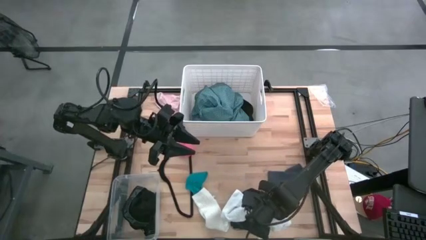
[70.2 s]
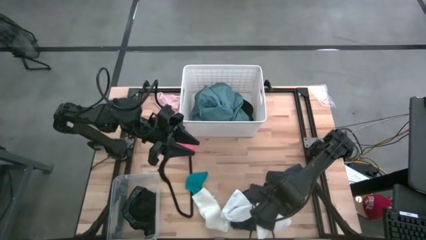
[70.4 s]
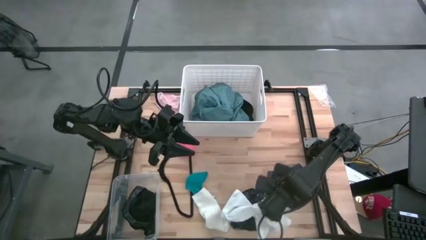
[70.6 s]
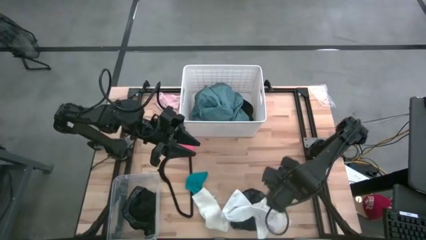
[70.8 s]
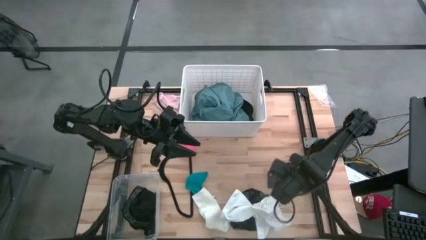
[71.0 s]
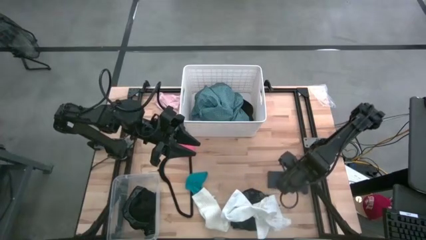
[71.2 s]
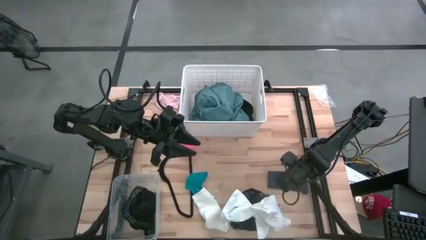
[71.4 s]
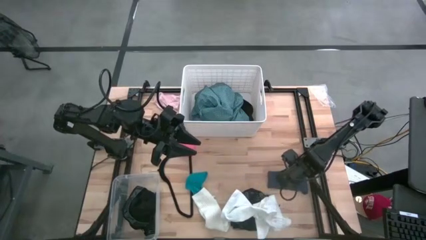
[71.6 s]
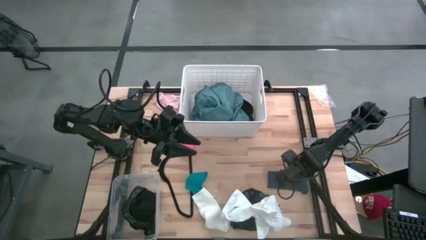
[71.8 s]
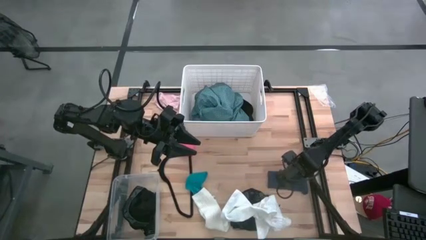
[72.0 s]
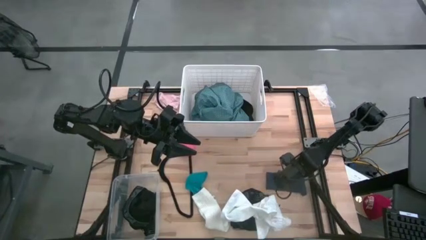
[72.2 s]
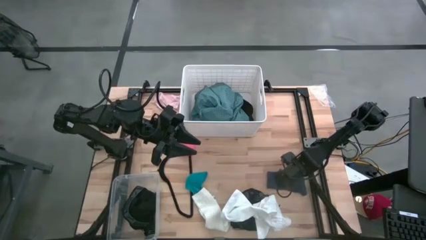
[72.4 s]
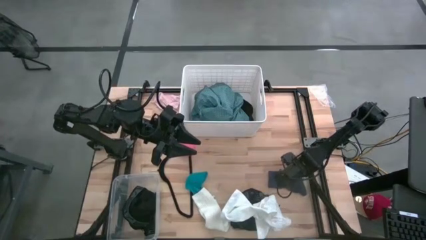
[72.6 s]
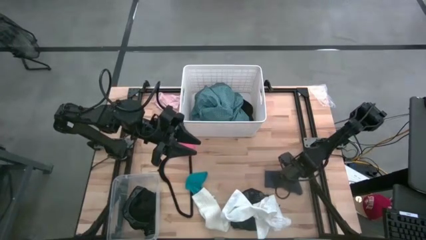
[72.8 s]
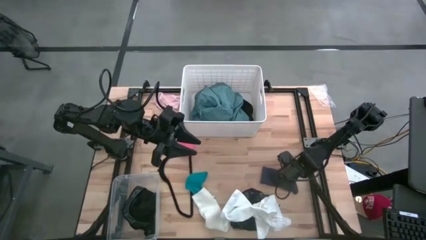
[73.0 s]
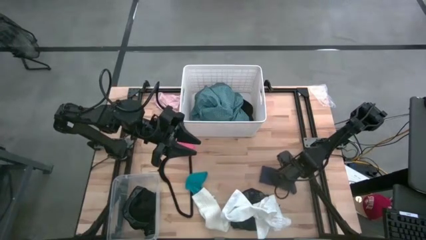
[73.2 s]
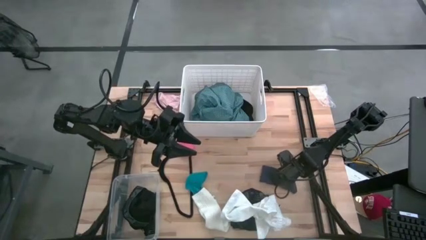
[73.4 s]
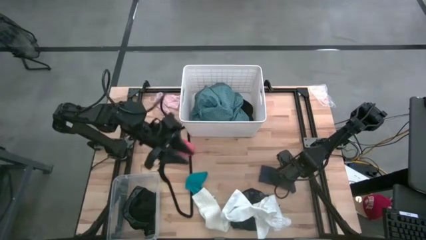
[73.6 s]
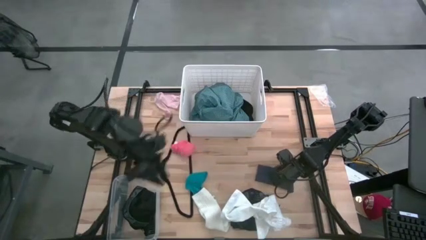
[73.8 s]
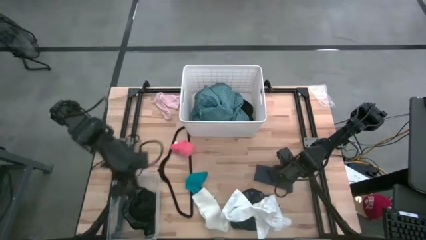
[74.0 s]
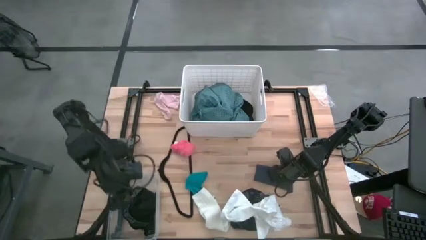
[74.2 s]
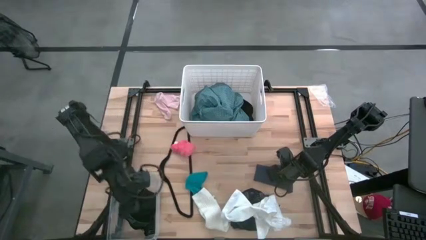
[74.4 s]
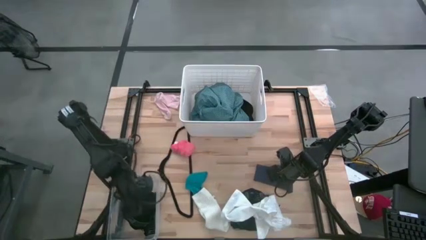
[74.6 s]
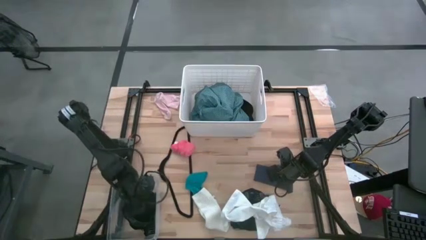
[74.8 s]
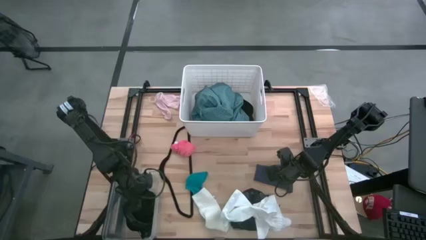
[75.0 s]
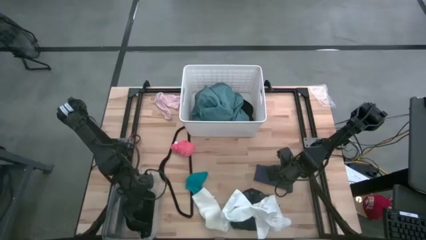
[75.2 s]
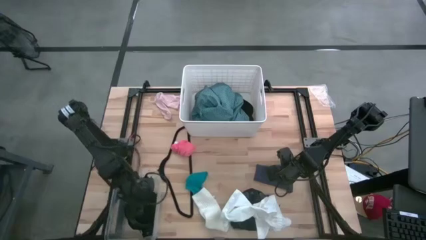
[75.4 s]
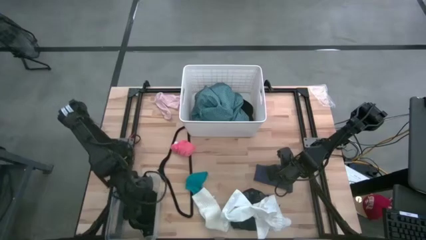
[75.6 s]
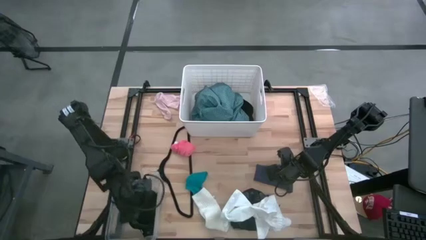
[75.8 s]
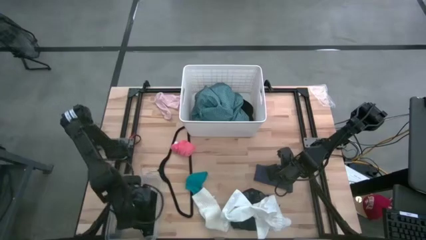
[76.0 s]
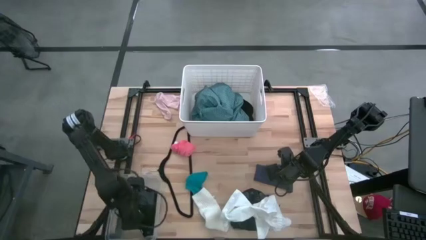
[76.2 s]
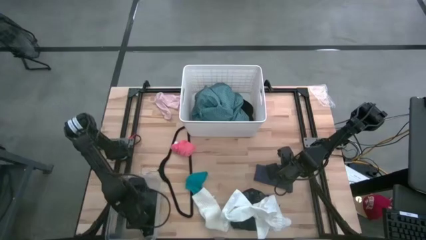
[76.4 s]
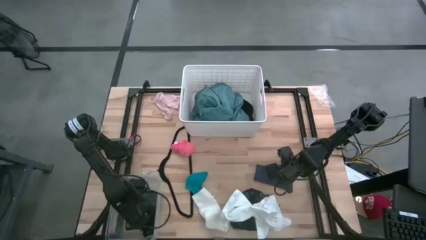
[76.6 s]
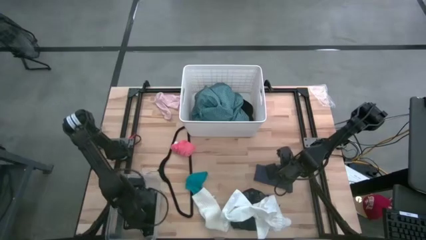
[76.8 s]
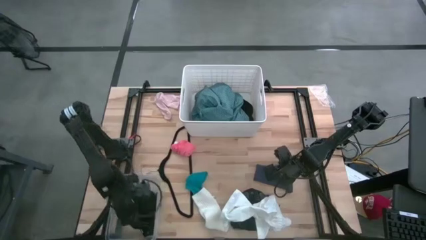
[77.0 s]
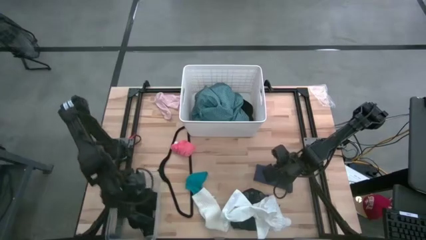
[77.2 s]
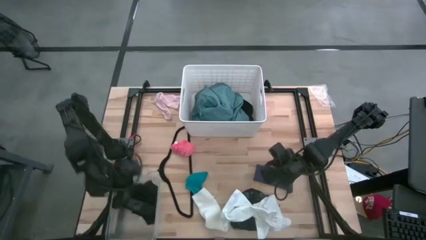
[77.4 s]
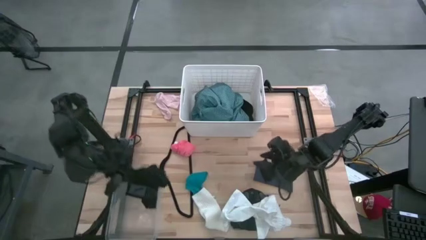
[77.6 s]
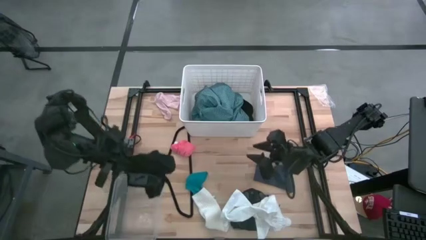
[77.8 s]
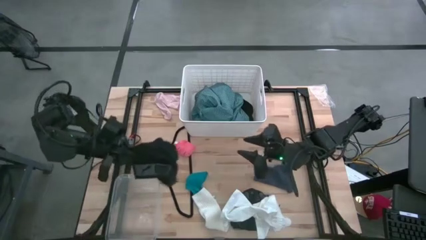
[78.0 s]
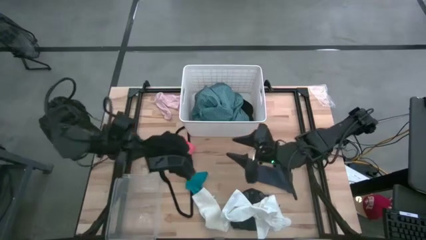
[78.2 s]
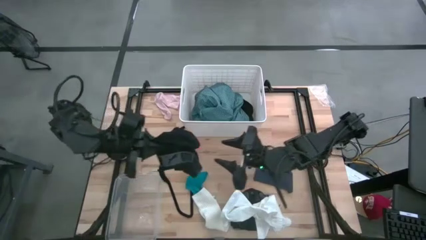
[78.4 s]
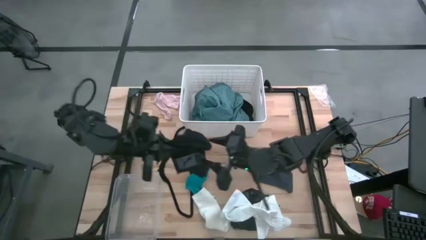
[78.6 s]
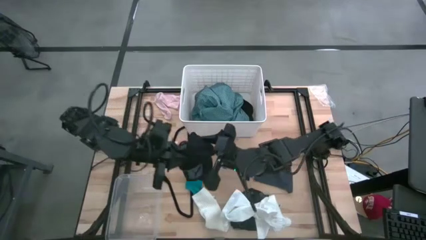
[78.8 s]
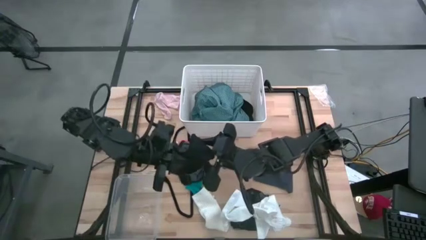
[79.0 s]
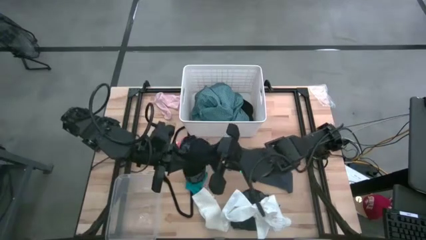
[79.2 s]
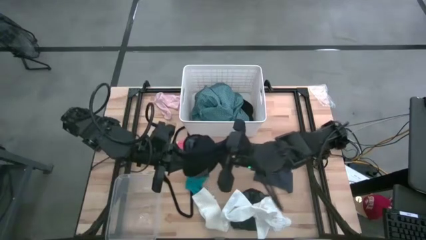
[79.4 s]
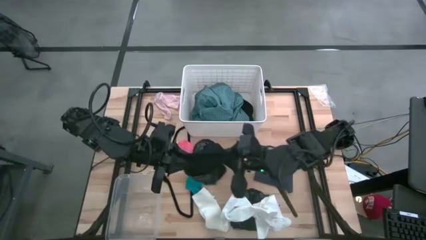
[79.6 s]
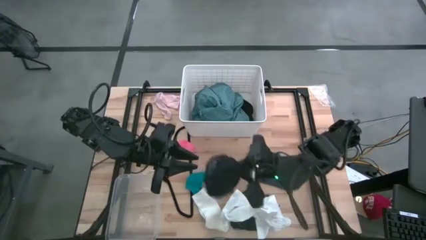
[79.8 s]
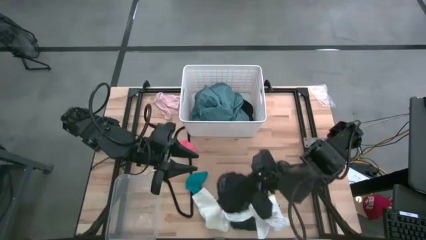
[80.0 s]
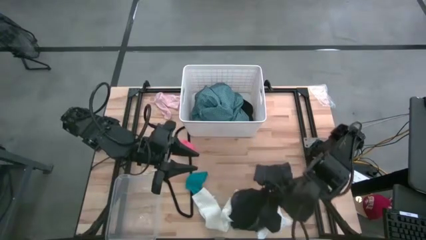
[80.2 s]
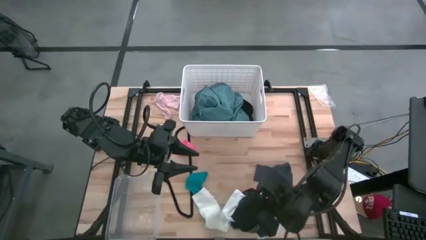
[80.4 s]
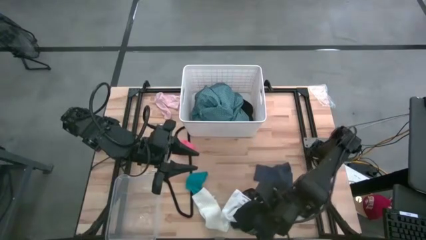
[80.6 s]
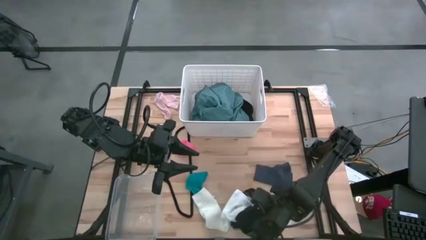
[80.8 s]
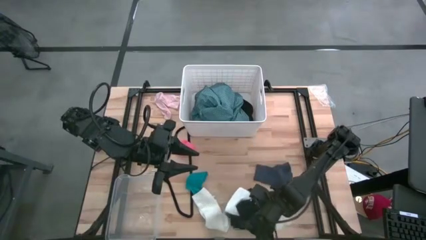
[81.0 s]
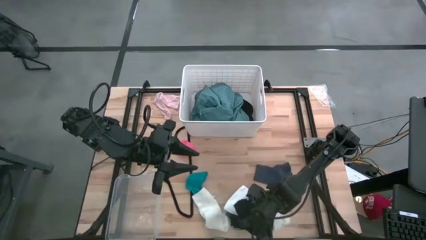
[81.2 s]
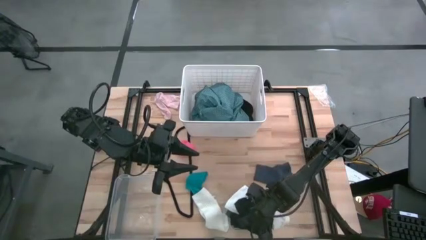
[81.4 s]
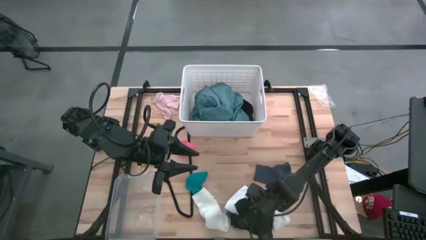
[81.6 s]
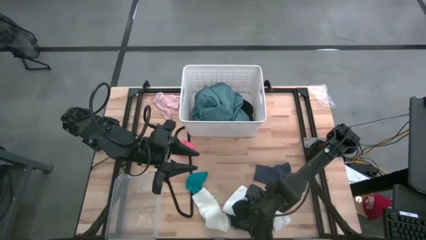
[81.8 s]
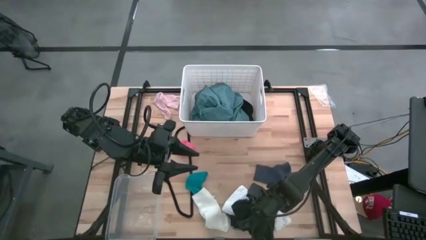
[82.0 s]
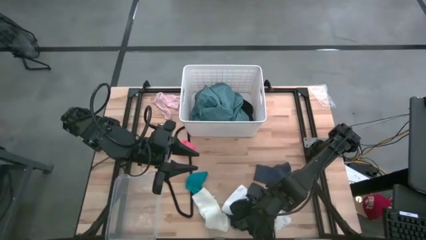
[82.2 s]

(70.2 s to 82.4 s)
Task: Pick & Place Cloths
Put the black boxer into the right transparent bin

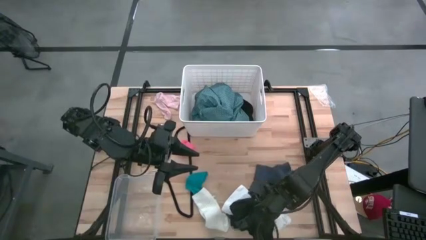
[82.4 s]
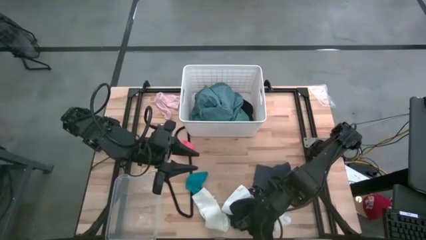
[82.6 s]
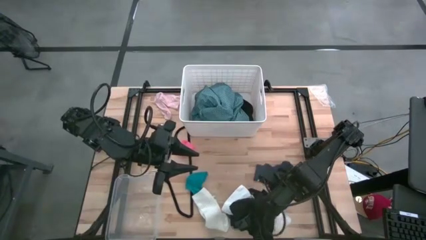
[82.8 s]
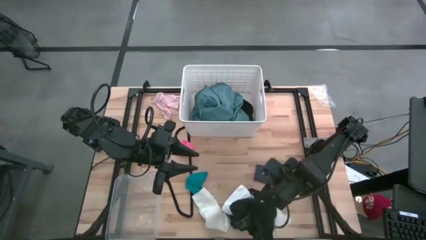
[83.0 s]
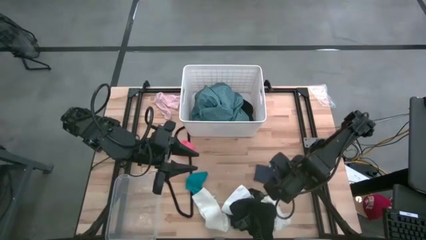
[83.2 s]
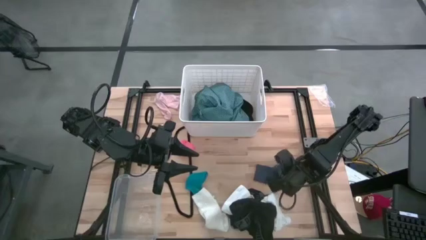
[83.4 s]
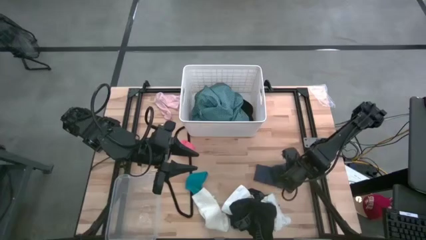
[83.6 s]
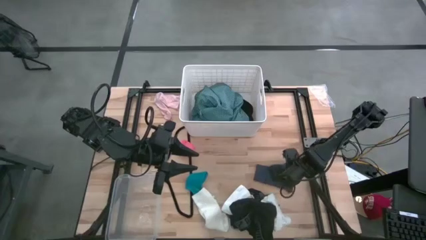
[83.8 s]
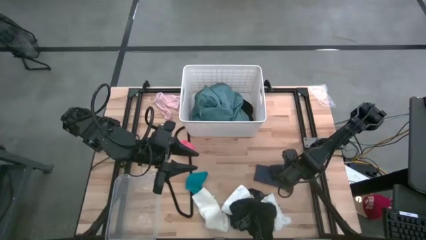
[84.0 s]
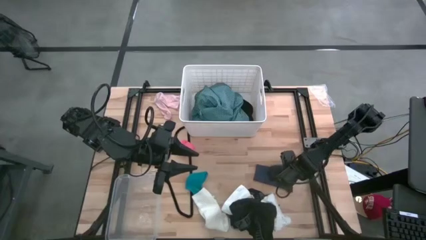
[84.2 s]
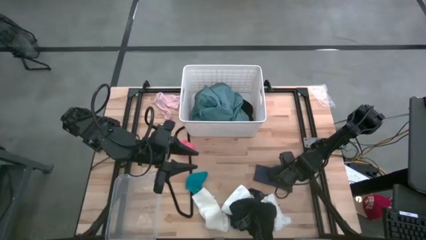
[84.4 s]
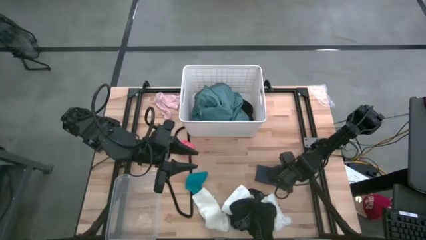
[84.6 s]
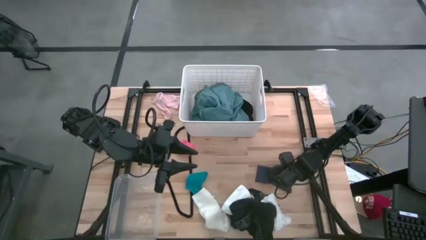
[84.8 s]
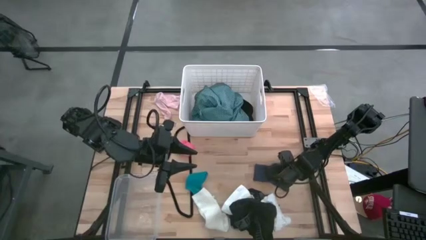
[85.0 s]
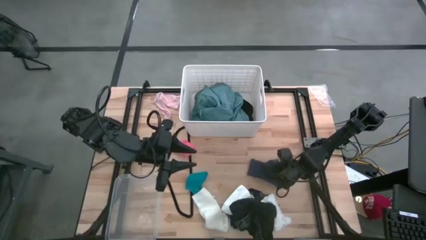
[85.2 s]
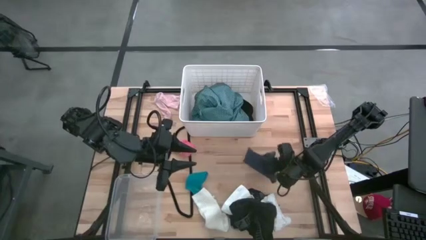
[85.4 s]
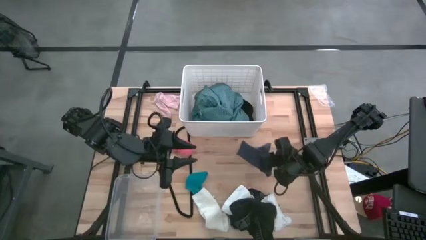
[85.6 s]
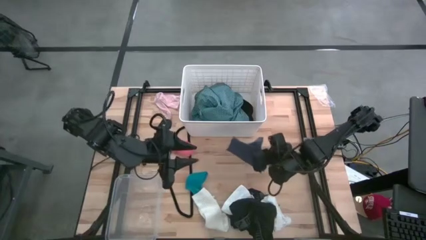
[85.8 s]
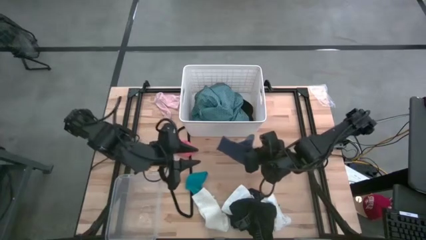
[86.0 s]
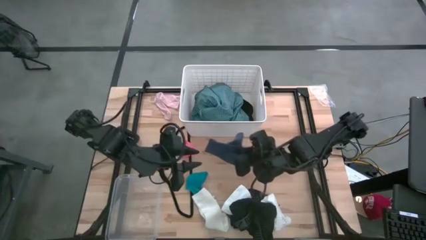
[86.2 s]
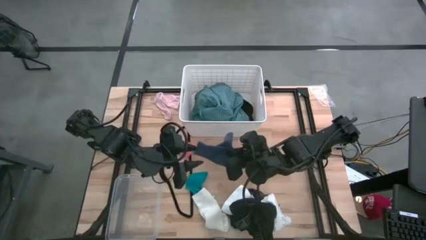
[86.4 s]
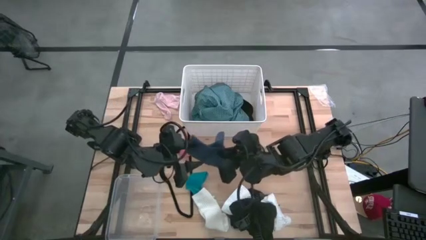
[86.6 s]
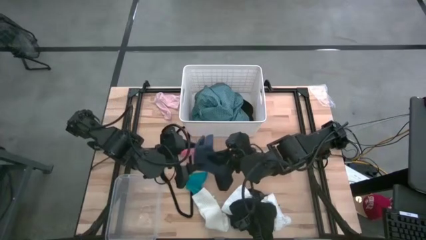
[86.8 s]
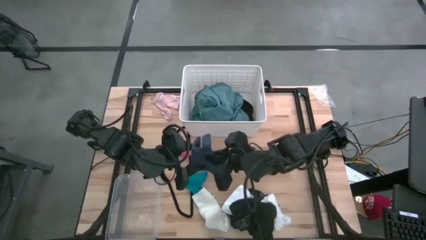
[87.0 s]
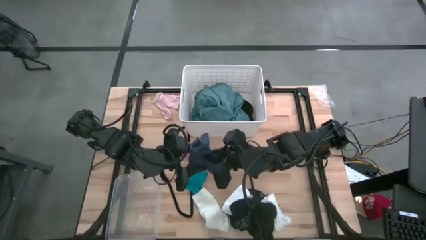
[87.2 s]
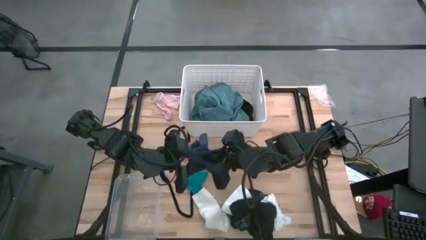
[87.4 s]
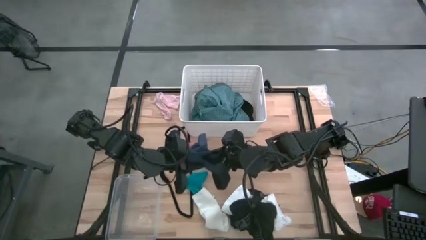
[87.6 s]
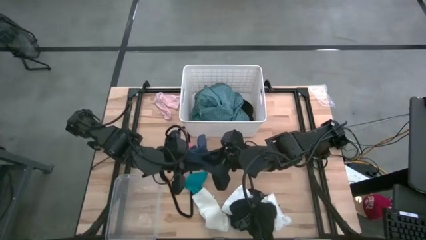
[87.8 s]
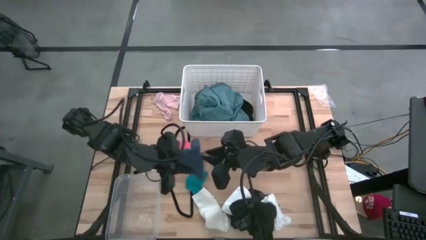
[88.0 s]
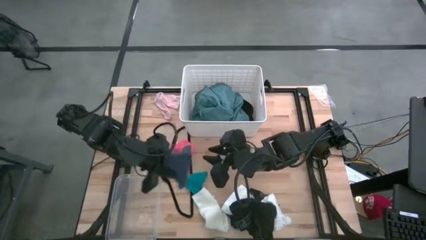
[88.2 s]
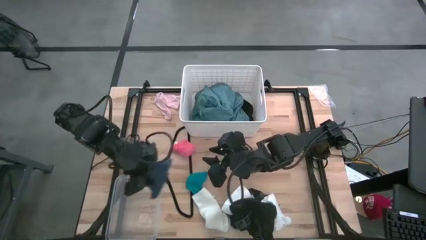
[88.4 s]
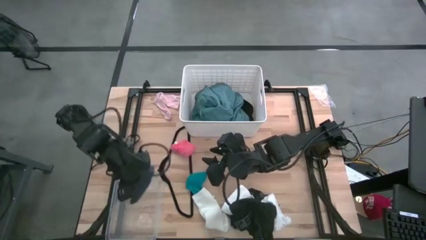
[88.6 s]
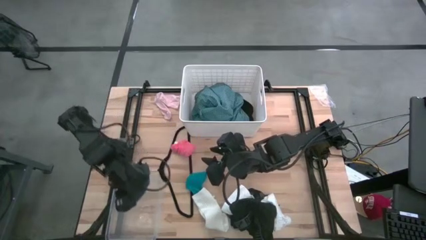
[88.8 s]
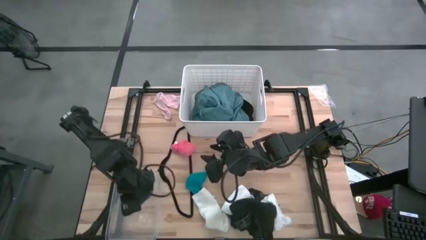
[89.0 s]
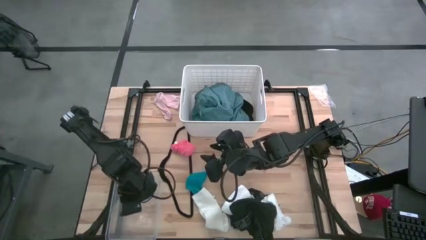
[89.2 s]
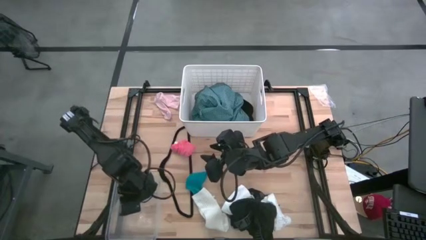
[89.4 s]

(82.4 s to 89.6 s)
Put the dark blue sock into the left transparent bin
